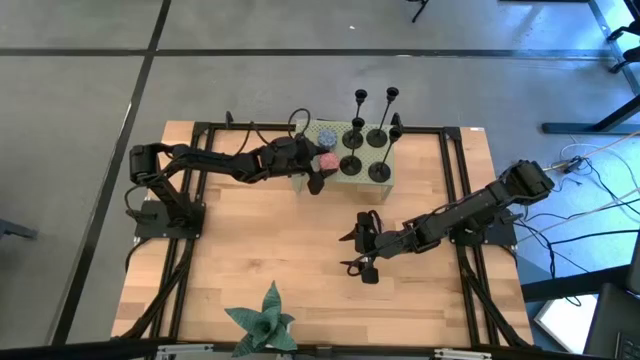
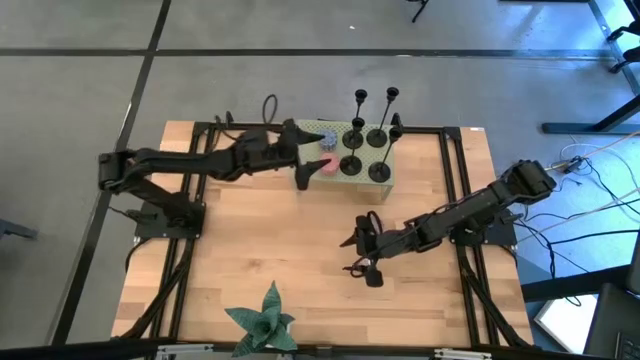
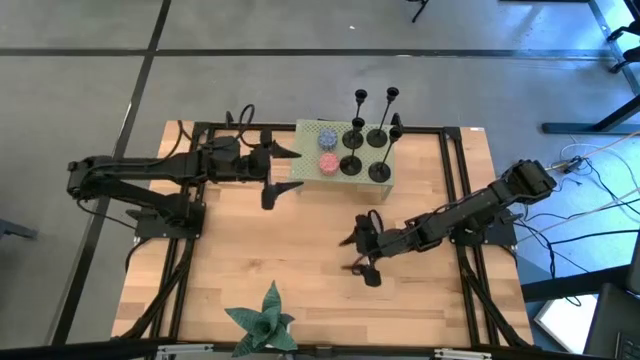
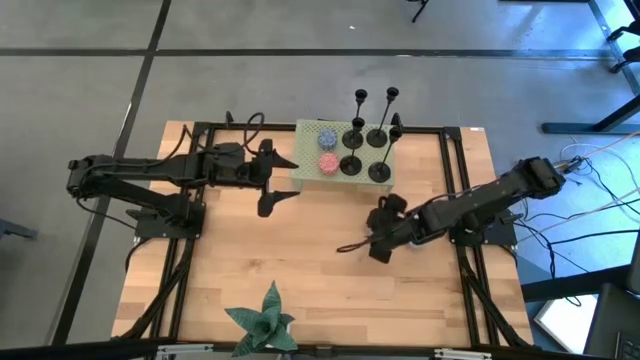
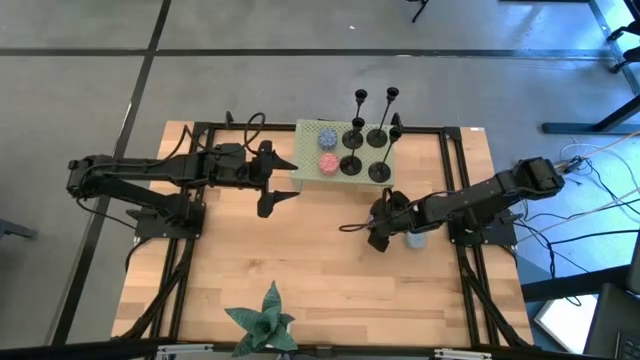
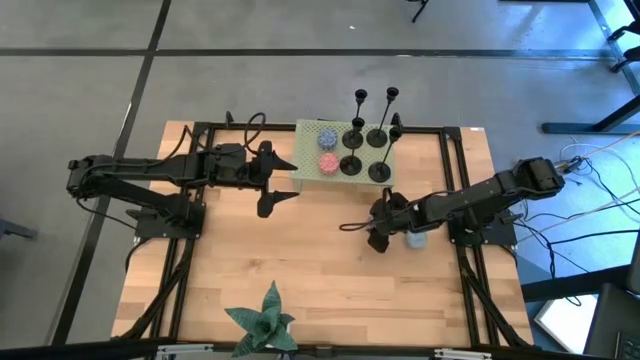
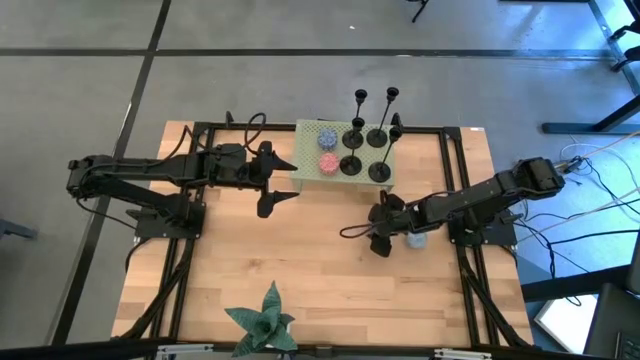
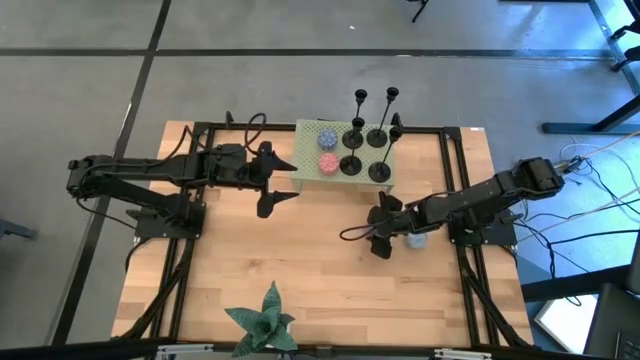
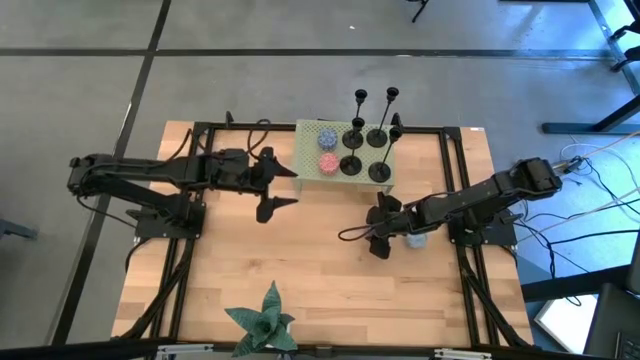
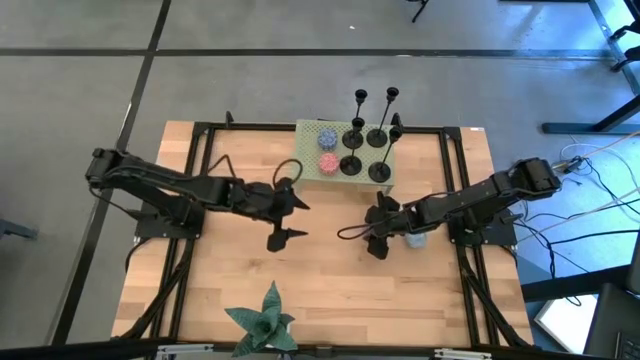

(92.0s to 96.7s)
Task: Pick & Place candle stick holders
Put the brown scented candle on the shelf

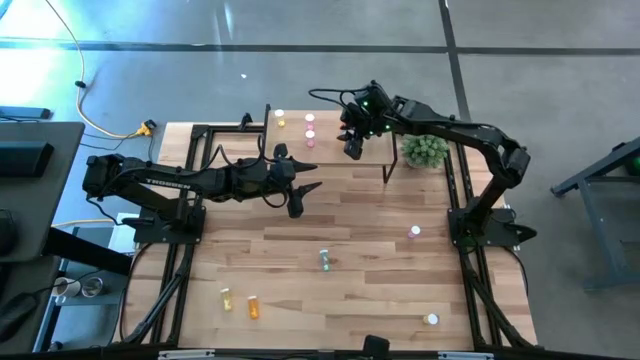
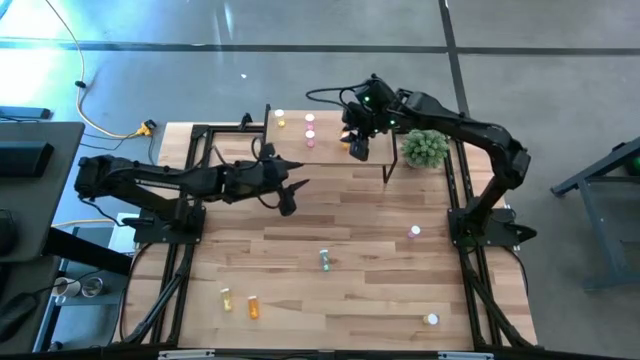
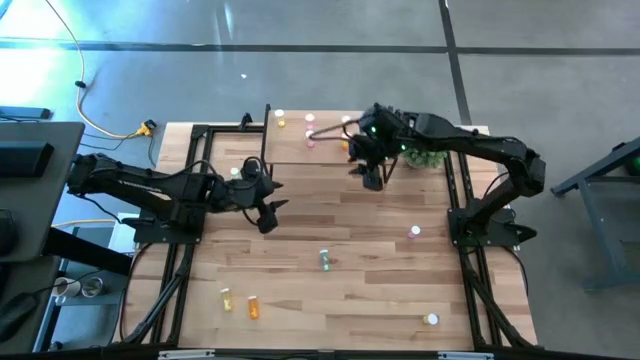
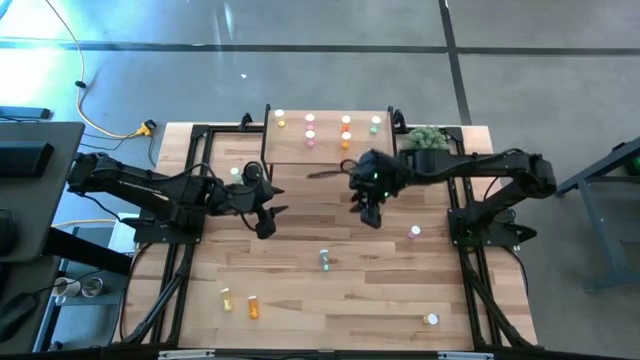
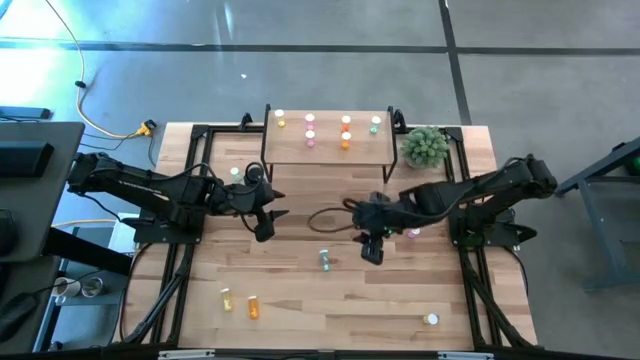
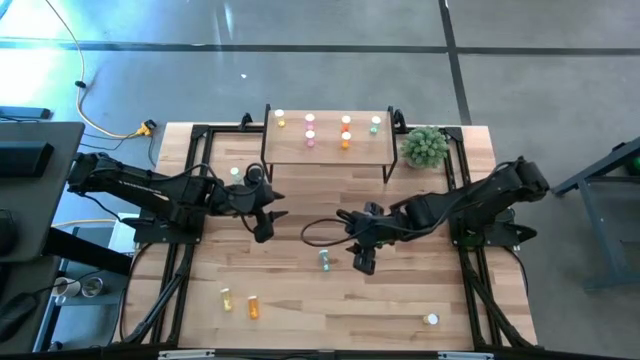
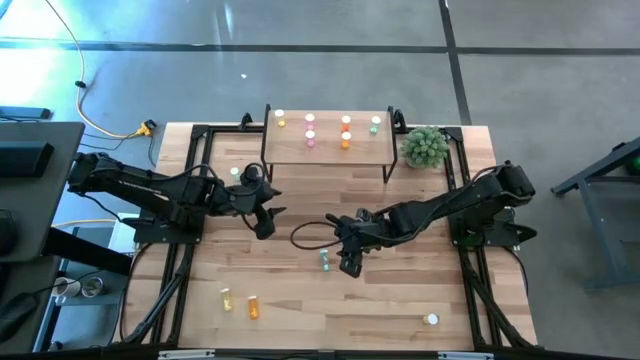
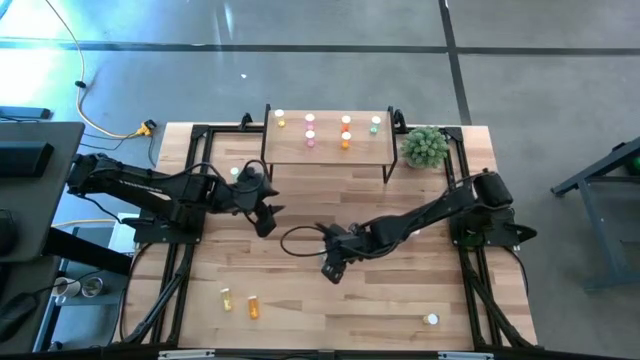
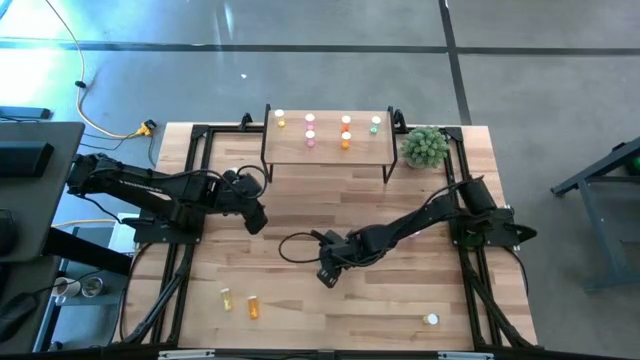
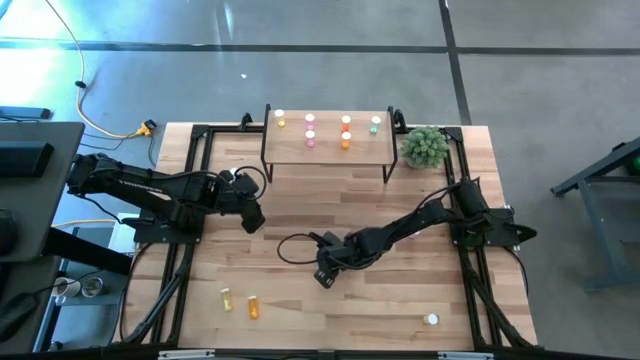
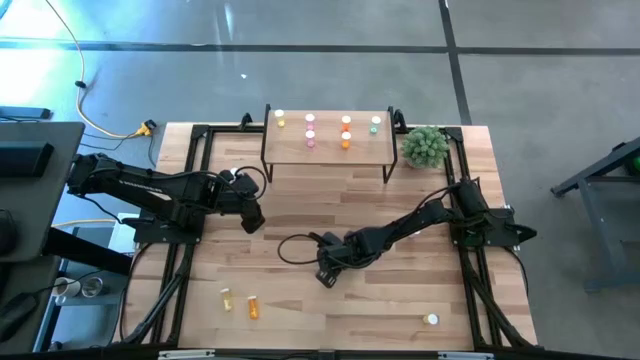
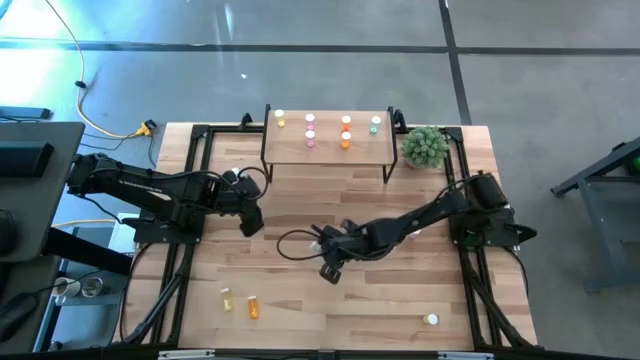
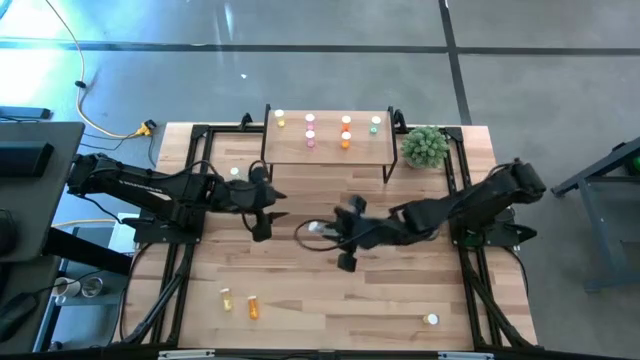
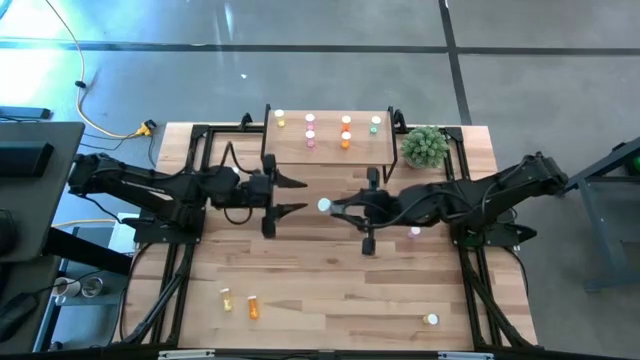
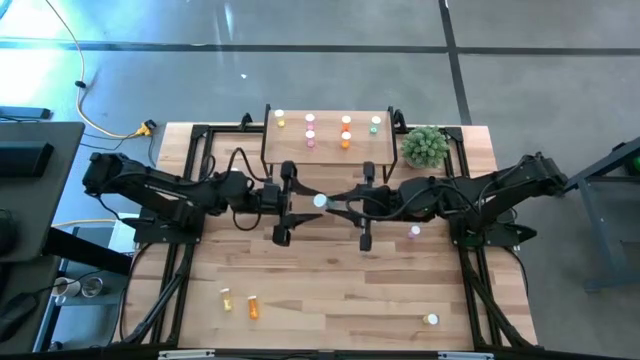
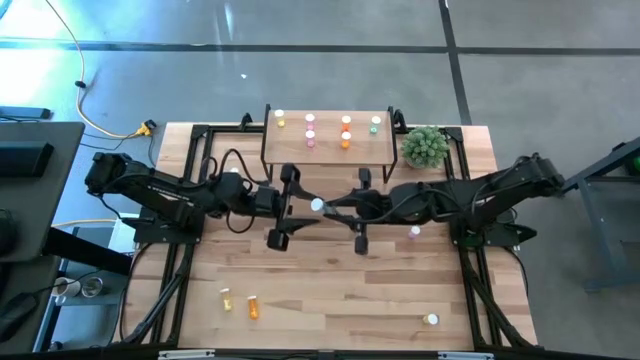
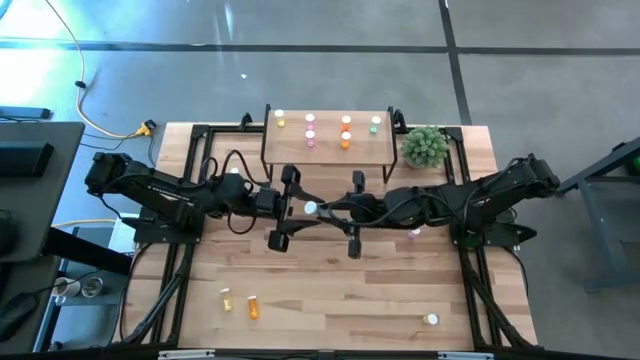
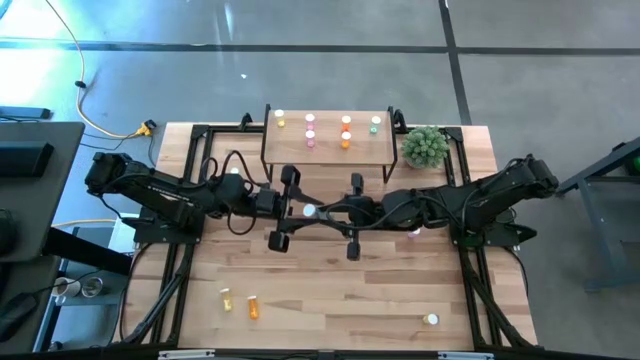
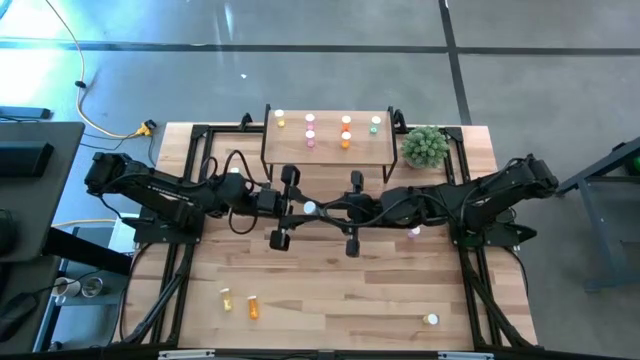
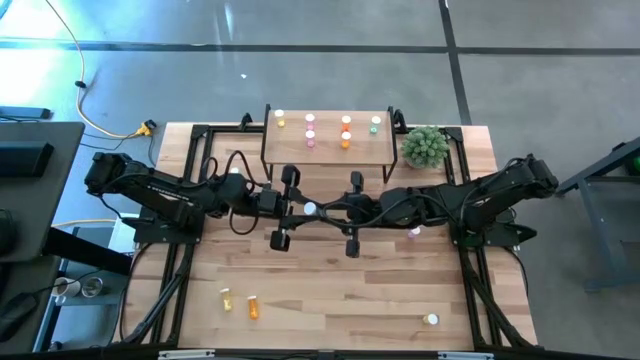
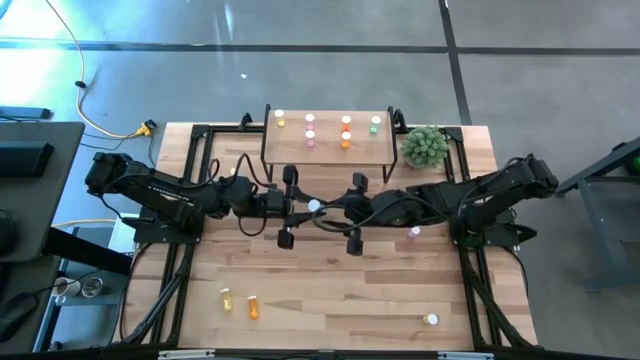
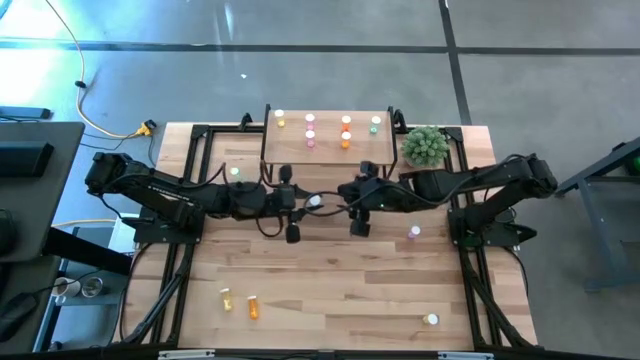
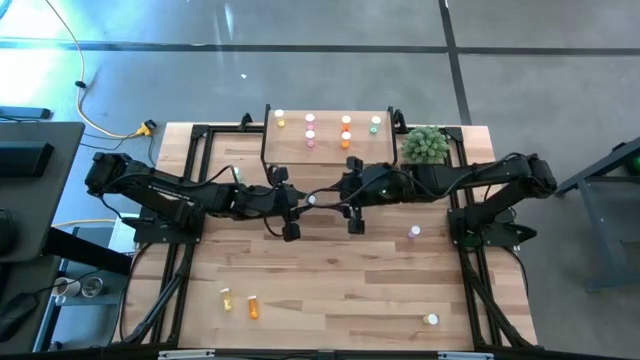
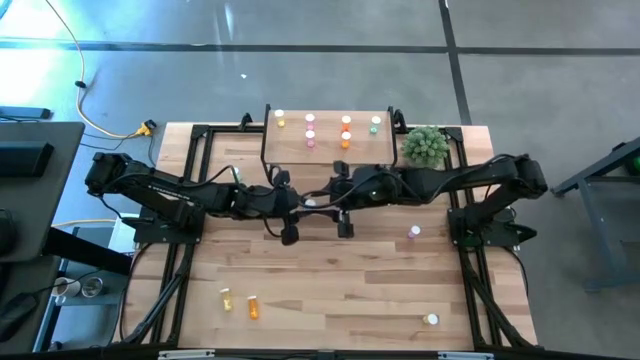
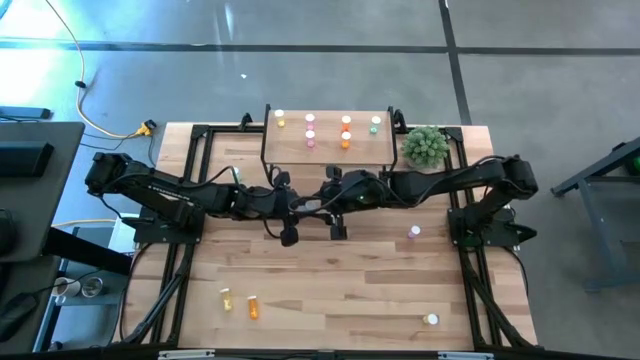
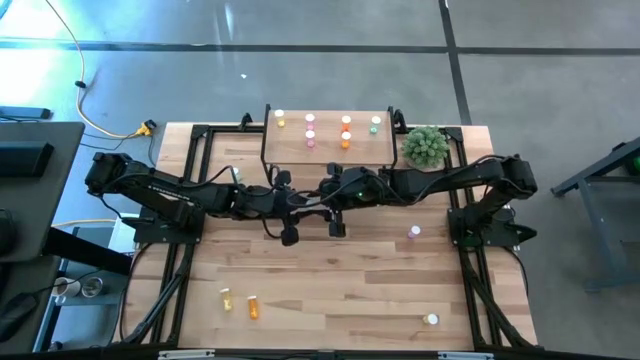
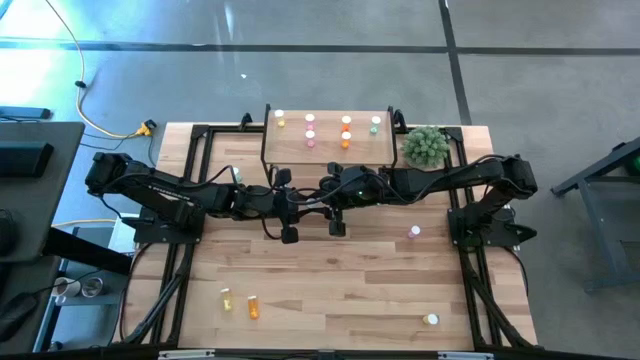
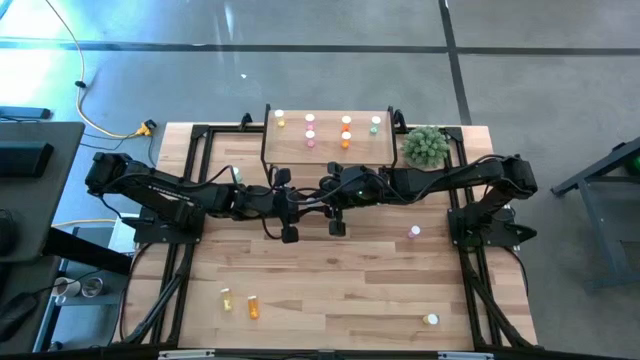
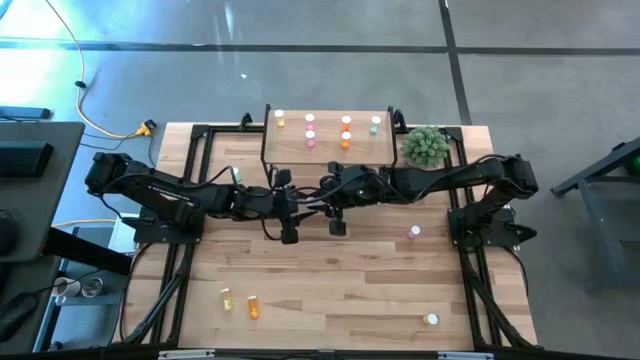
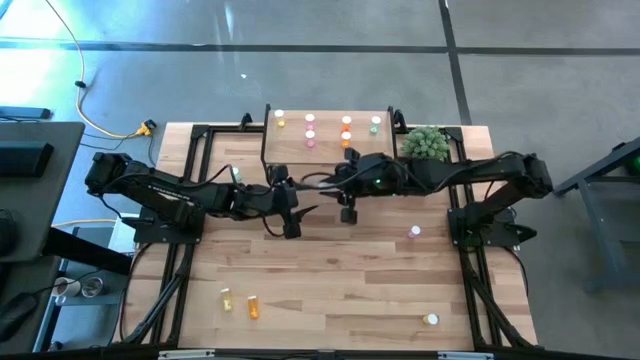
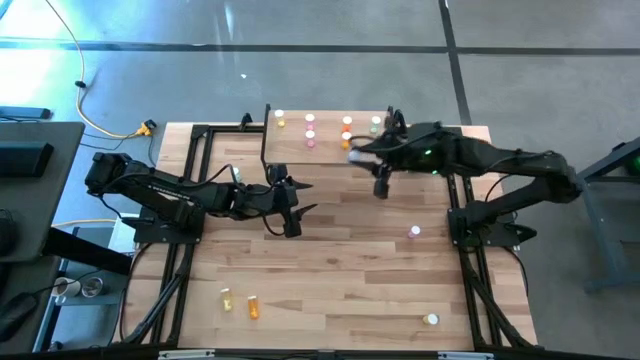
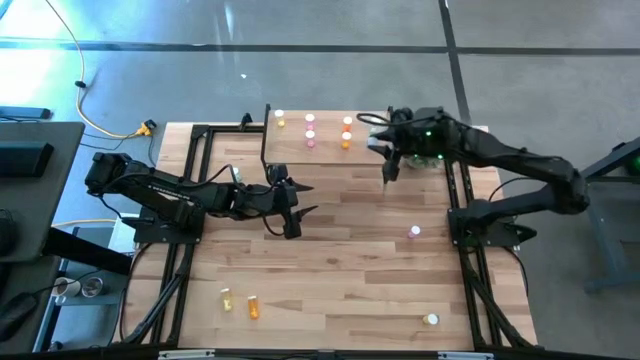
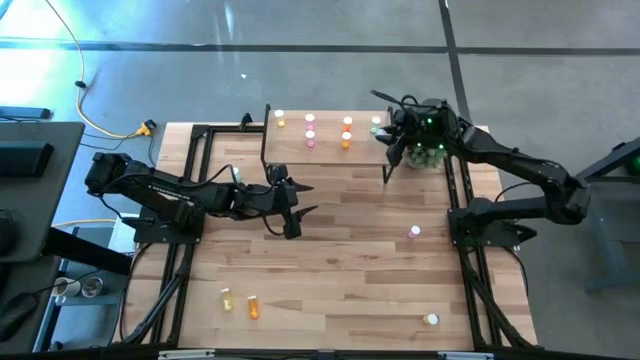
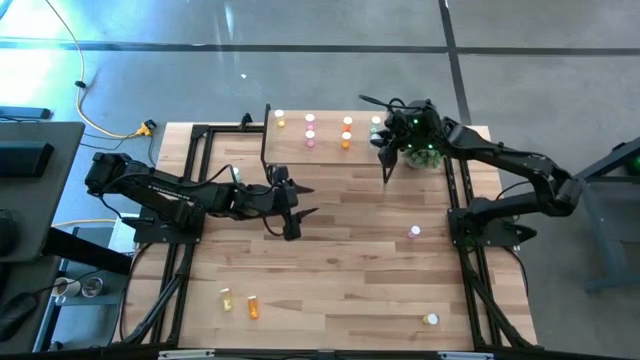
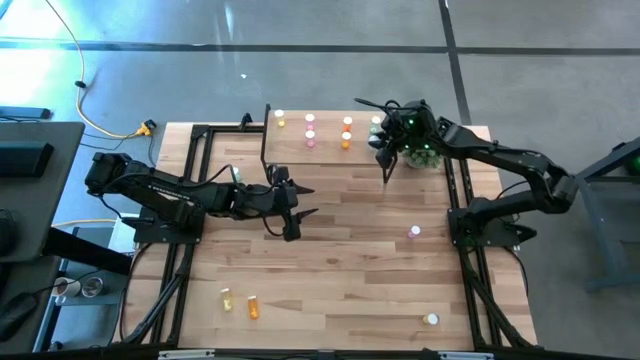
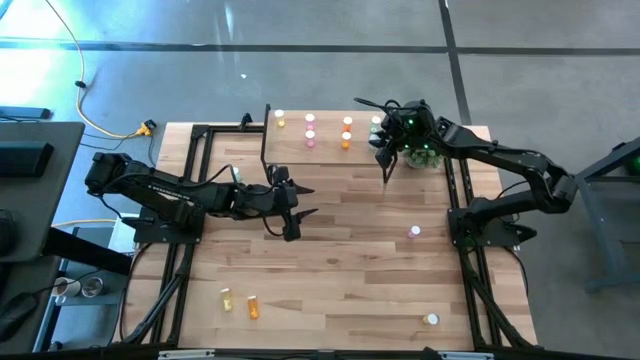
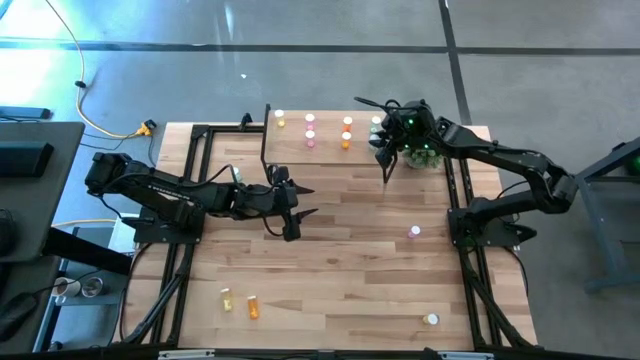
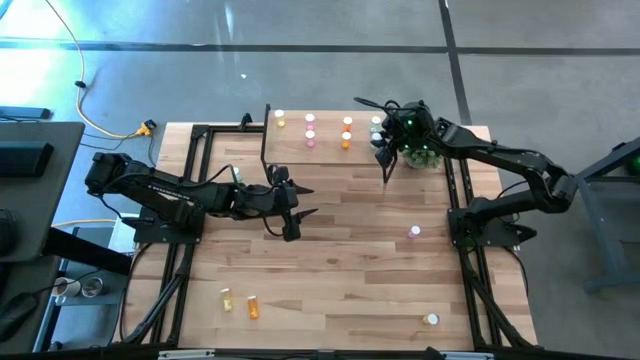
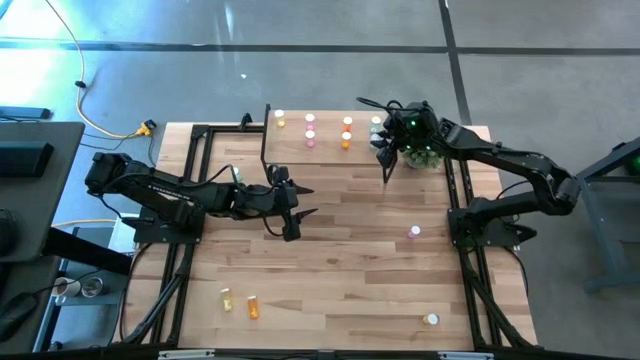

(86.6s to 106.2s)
Task: Pick and place medicine bottles onto shelf by color
Put the bottom blue pill bottle on the shelf aligned with the other blue pill bottle
